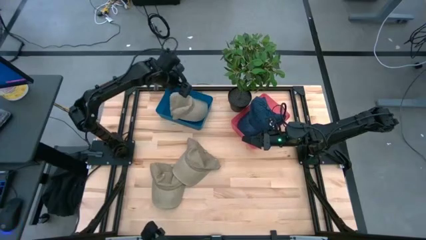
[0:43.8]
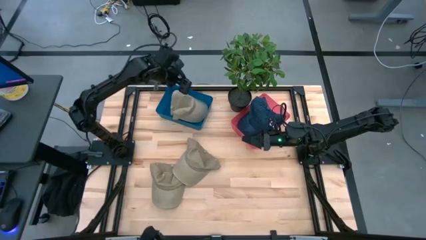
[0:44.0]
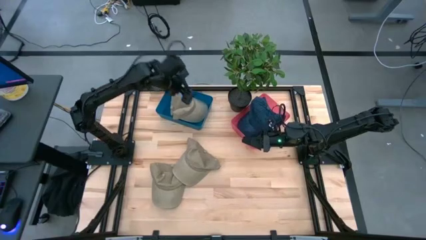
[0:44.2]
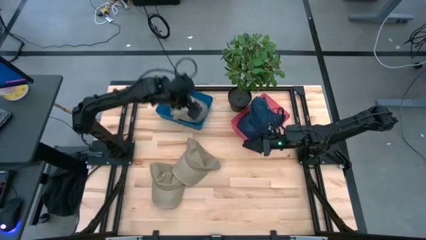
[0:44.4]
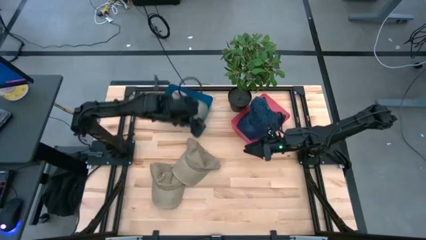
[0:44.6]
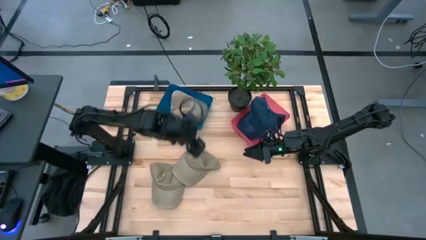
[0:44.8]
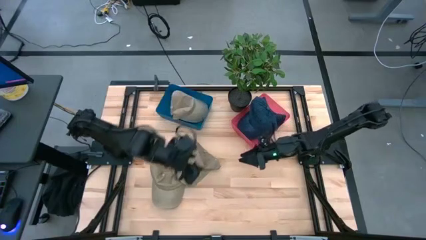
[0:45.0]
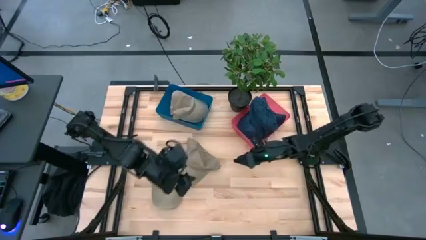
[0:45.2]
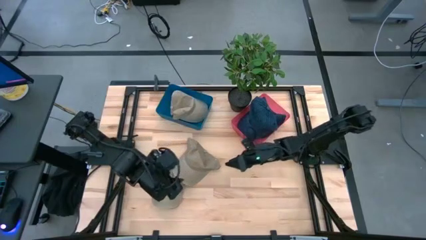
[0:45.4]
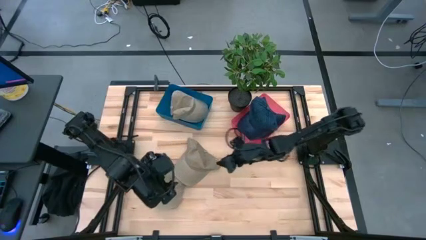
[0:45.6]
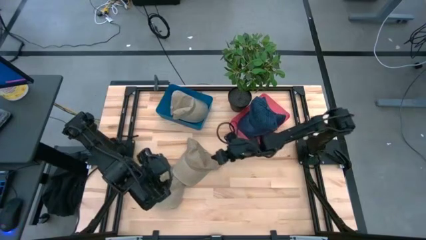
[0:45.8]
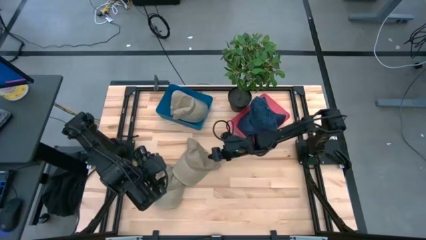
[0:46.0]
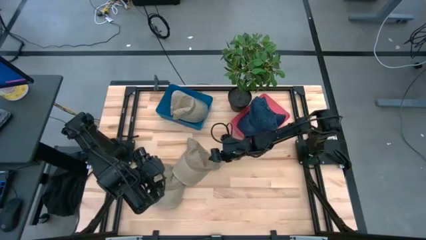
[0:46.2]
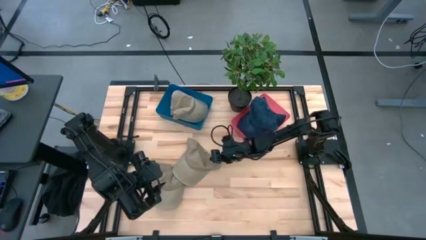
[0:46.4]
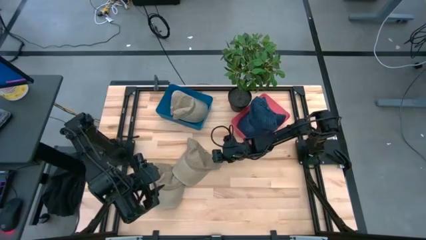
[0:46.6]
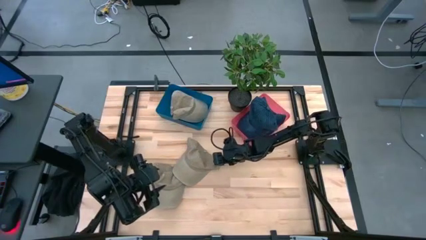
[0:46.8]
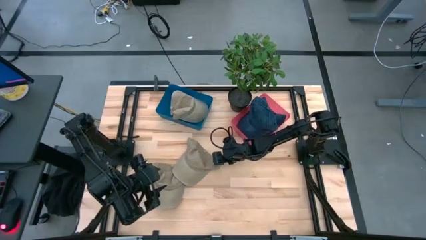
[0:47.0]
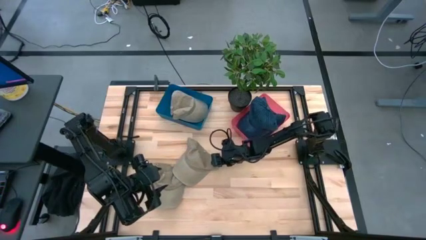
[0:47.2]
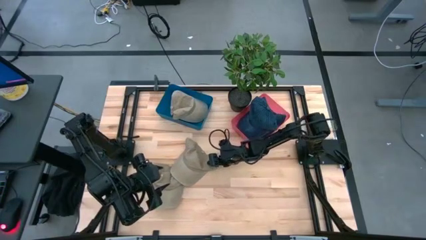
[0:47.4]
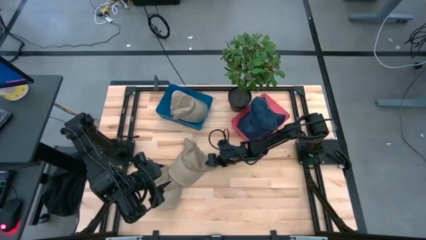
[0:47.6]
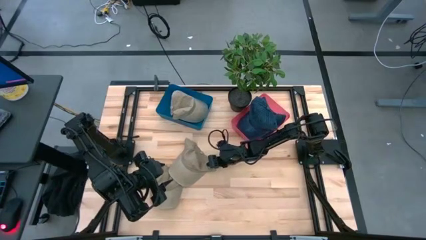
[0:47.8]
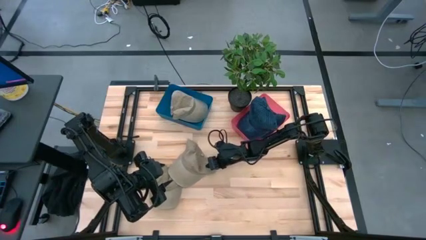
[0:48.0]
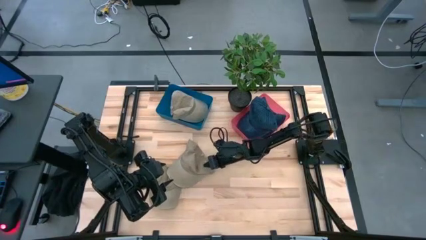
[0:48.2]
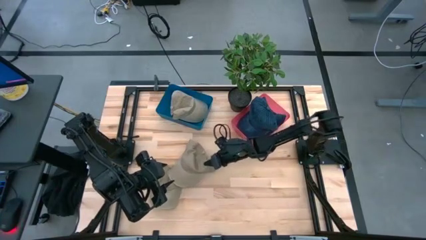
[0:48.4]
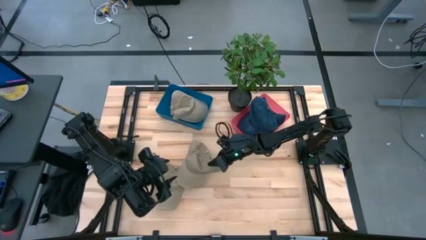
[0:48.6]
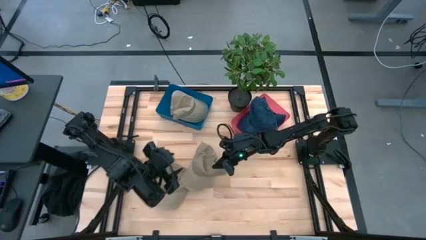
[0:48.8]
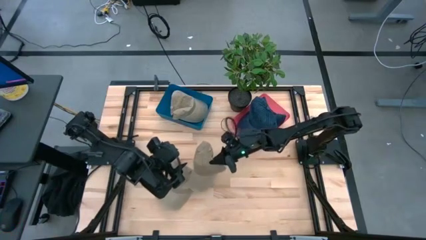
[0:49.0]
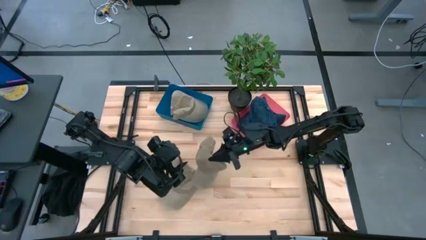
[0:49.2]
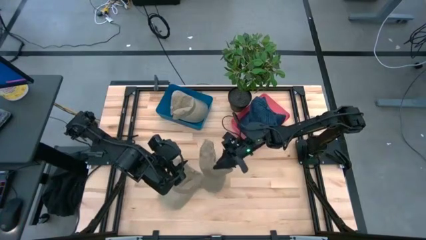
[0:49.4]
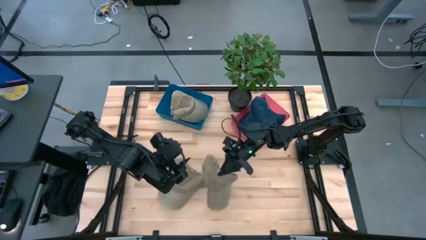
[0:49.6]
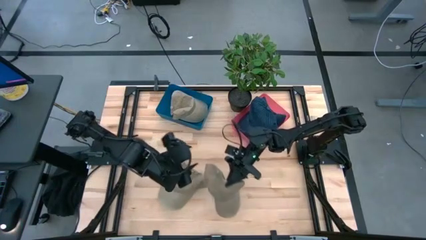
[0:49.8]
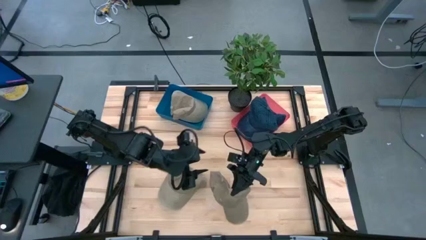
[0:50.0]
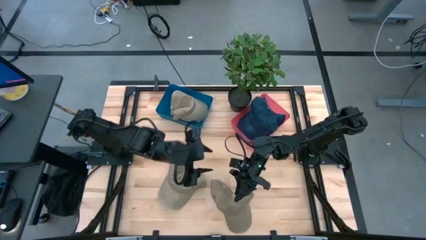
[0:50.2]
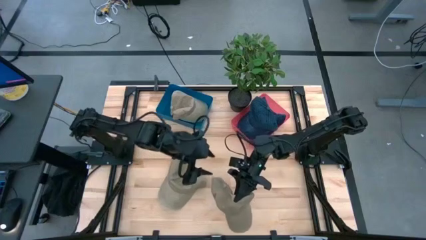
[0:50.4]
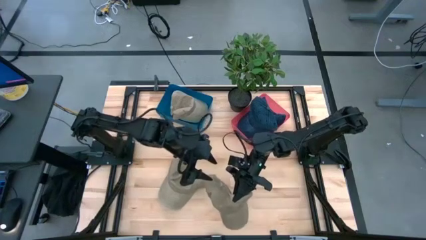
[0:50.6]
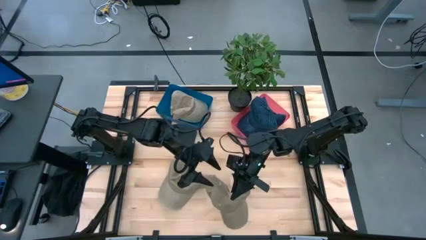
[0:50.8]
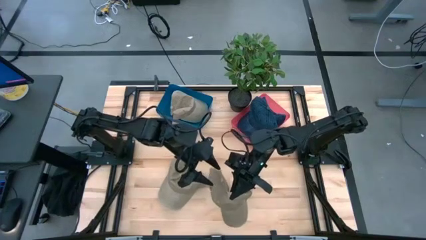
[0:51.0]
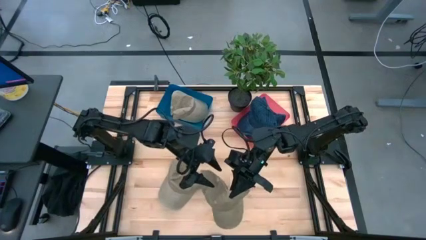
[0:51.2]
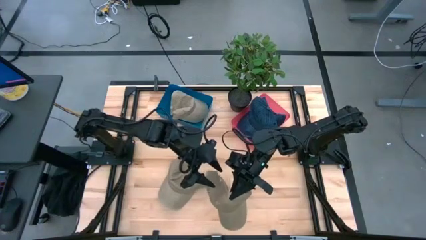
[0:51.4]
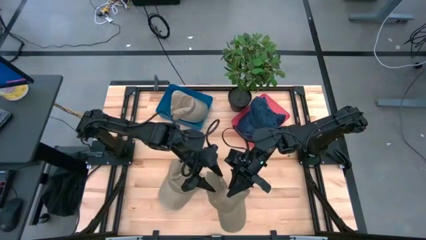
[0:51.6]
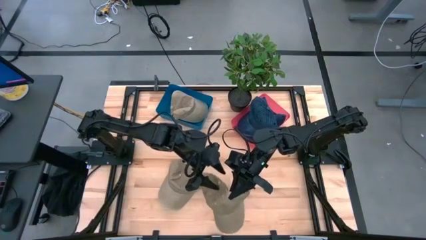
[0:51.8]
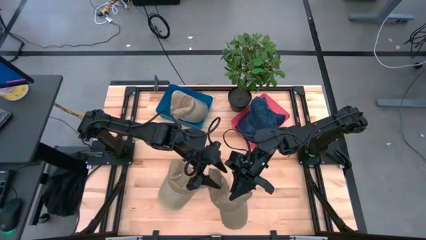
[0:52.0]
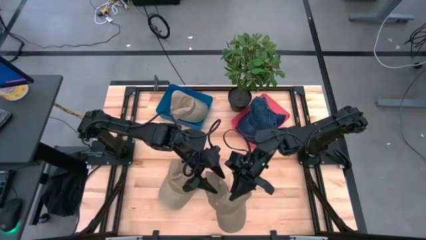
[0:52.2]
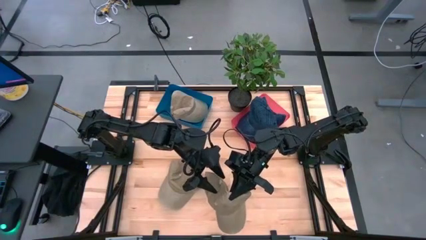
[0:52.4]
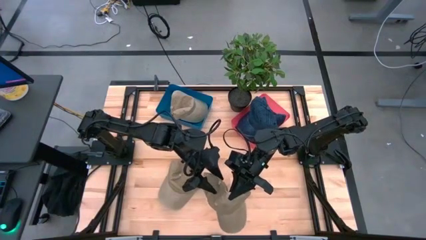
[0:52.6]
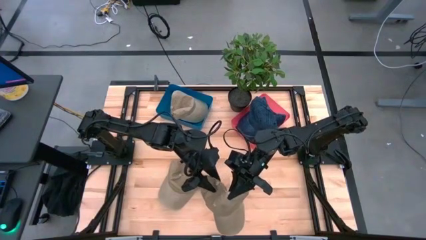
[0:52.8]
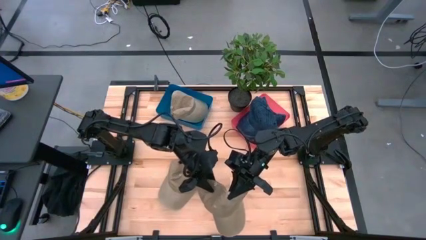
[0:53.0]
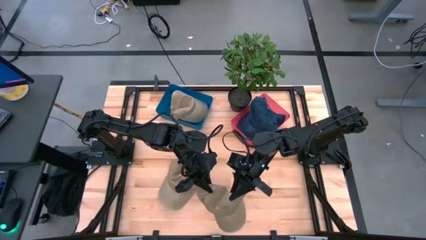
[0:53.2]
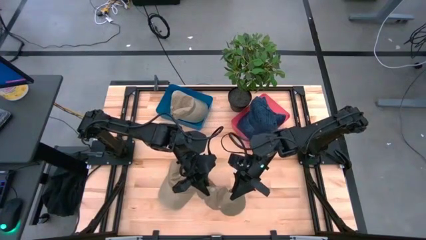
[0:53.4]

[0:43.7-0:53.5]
Task: Pick & Place hat
Put the top brown cap into the blue bin

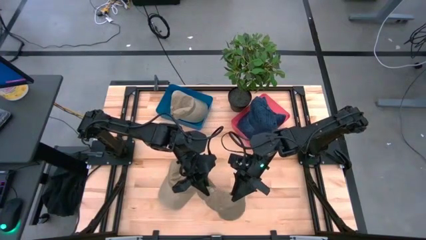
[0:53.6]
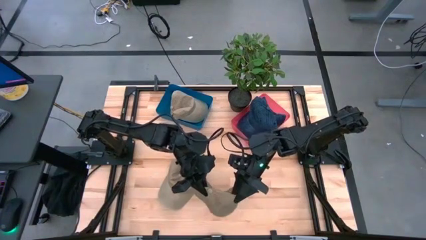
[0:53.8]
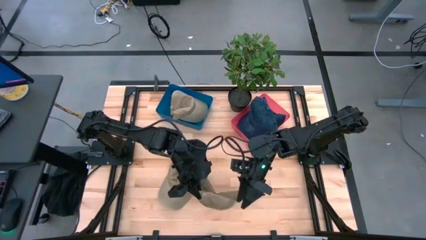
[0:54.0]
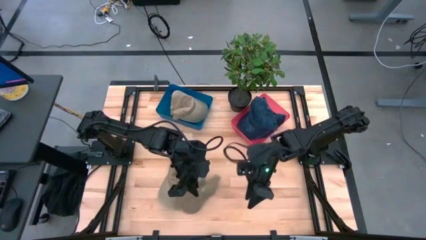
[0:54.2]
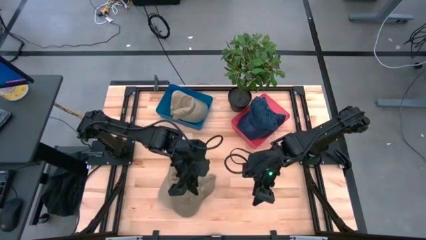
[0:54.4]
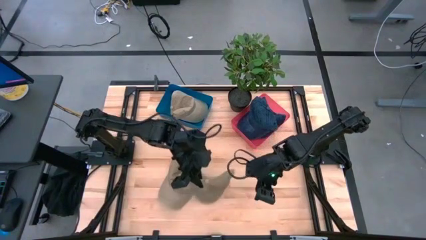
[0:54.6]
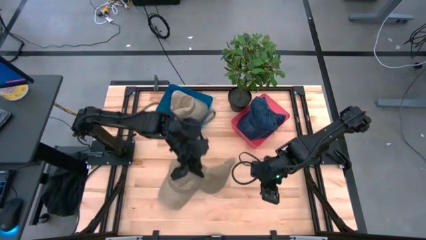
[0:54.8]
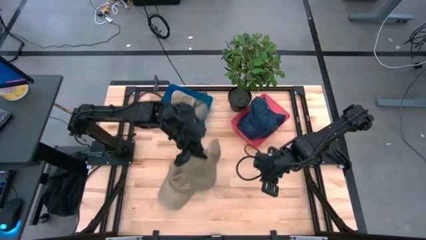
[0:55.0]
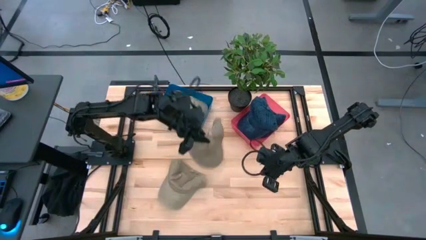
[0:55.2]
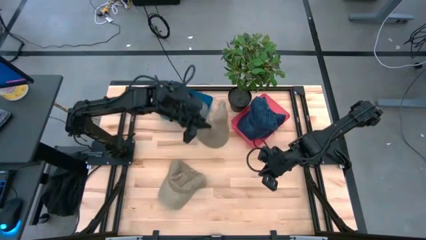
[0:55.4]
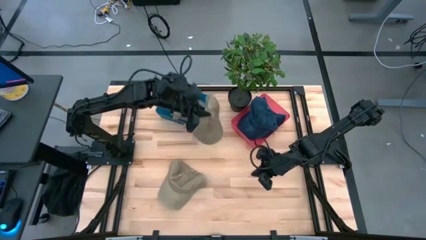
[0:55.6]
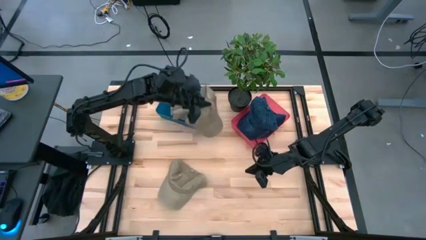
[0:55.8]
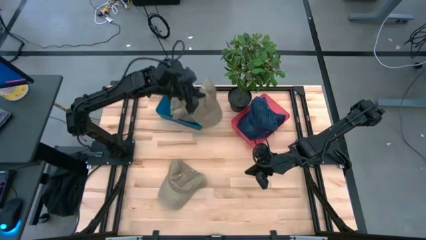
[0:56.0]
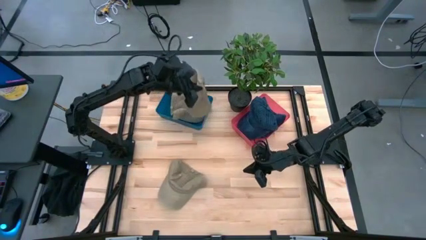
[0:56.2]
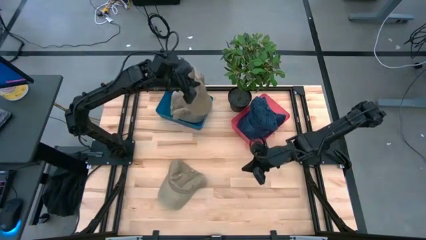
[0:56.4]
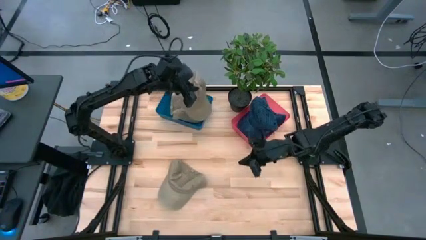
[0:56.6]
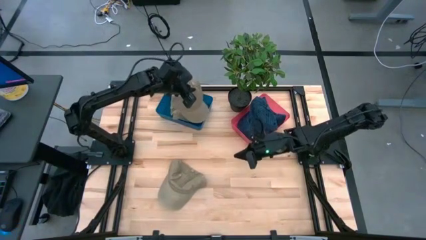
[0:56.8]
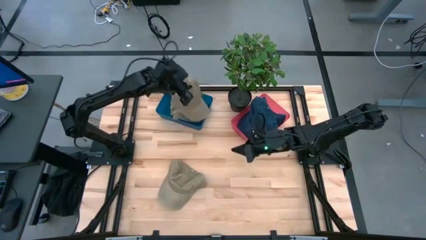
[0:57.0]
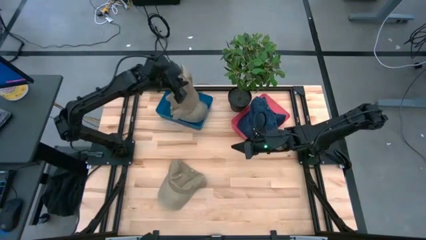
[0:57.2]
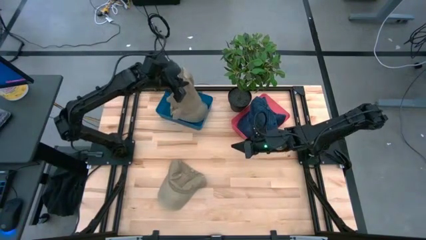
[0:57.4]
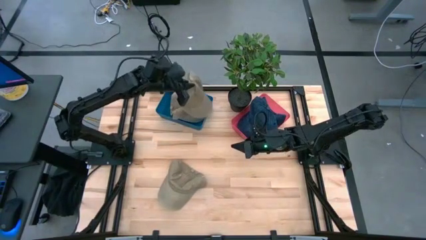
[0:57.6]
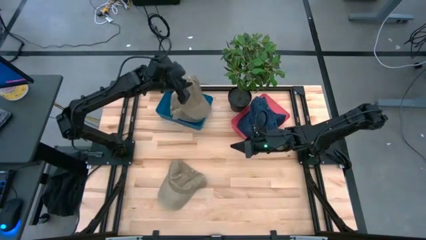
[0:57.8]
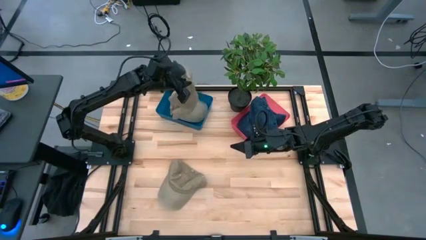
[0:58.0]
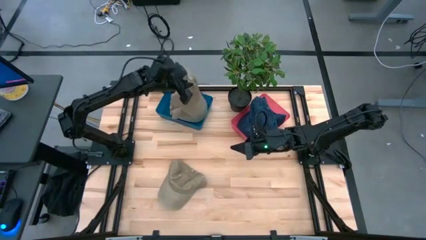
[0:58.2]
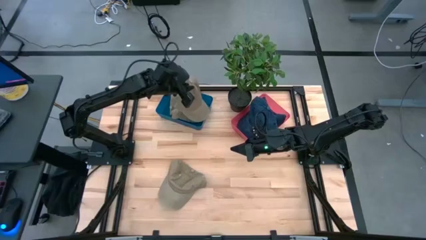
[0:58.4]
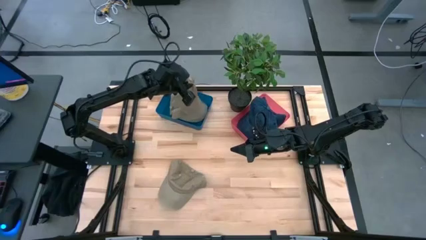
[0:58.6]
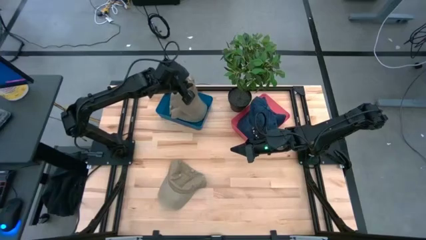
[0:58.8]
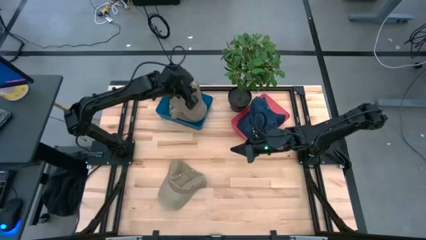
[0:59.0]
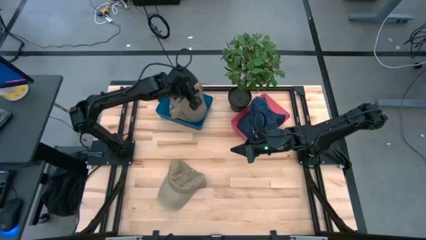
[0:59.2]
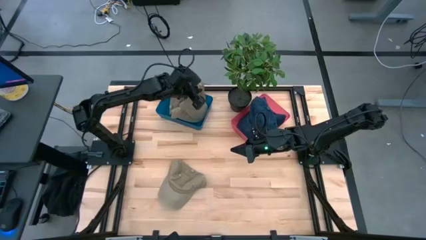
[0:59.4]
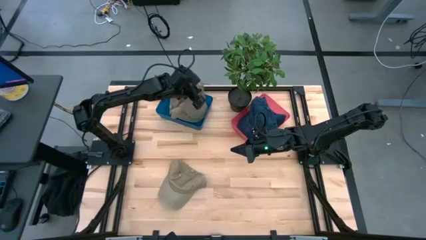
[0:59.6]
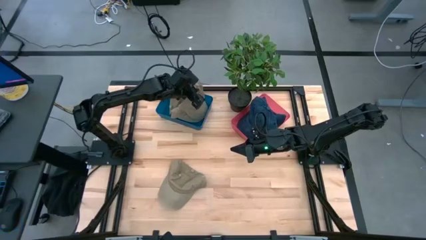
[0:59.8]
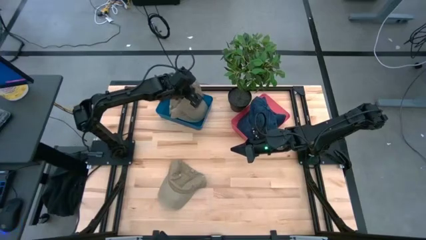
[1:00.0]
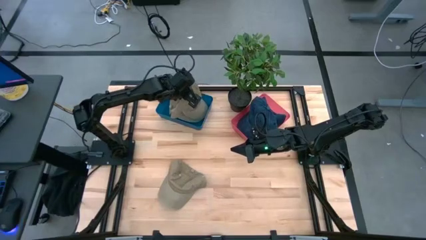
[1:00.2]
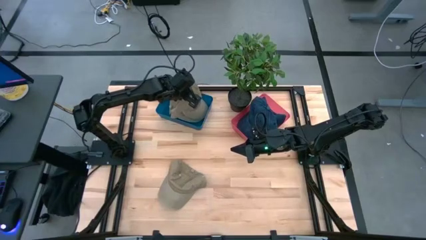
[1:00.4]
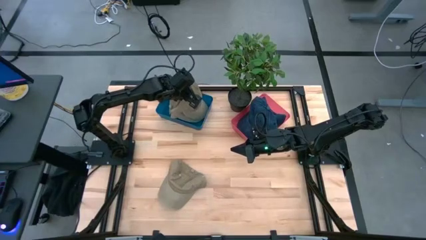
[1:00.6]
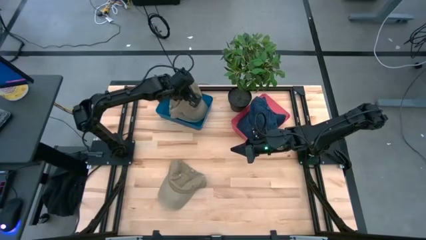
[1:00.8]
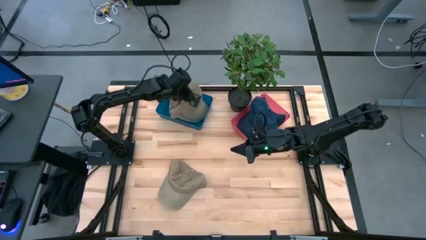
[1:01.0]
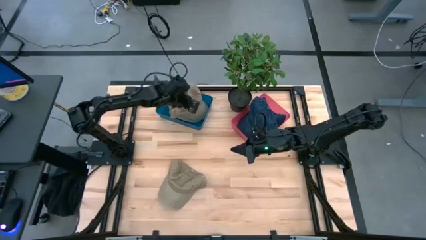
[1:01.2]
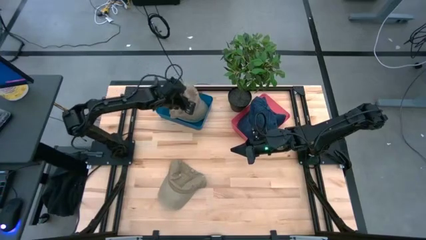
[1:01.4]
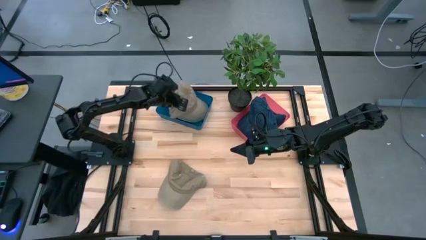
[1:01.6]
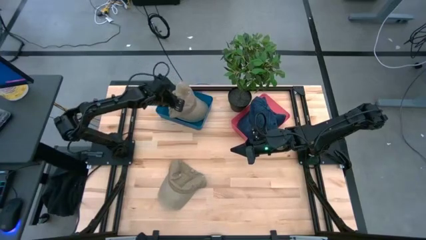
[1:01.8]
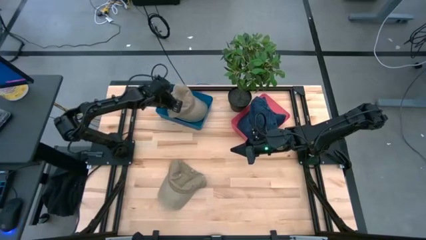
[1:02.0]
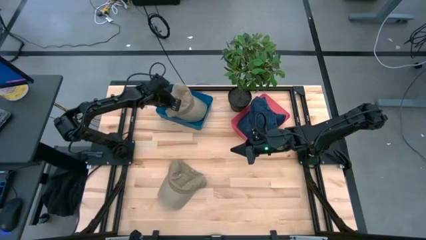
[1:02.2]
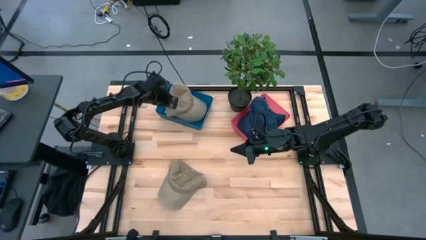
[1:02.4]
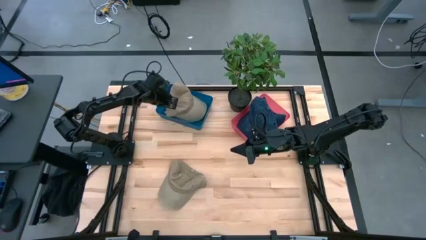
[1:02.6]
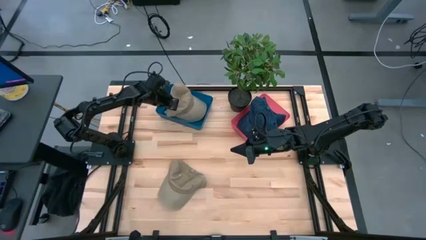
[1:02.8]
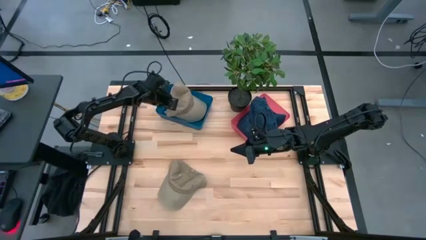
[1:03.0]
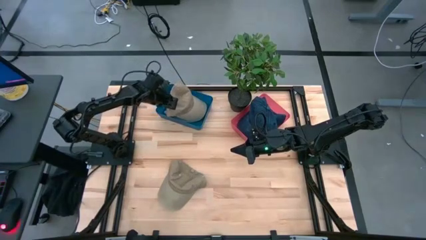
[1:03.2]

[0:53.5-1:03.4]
Put the top brown cap into the blue bin
